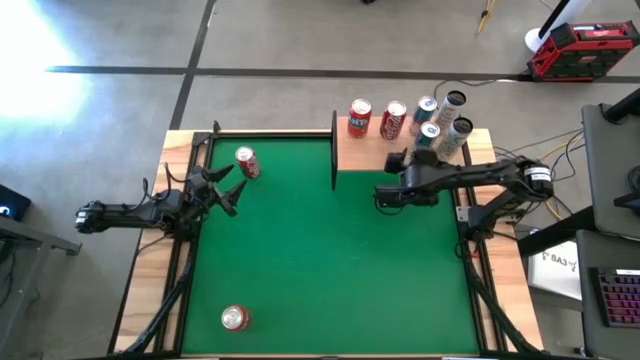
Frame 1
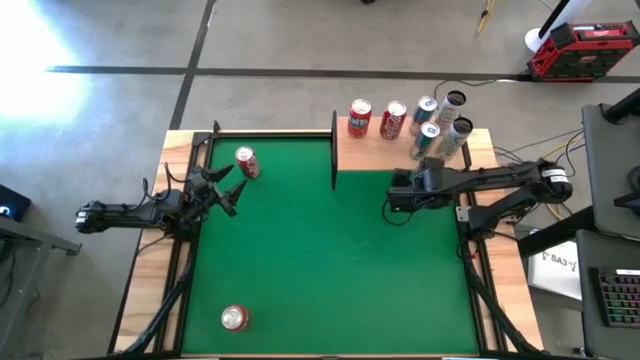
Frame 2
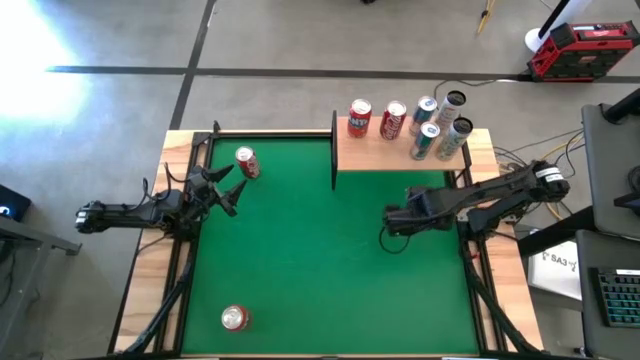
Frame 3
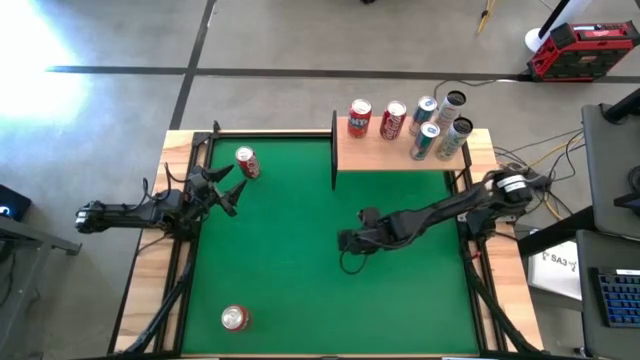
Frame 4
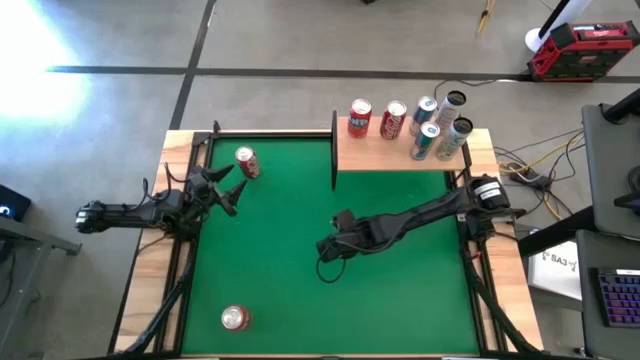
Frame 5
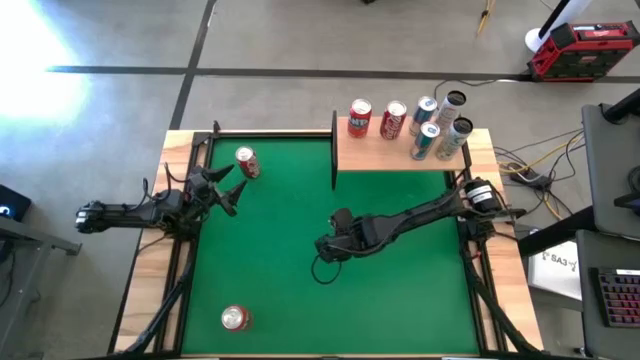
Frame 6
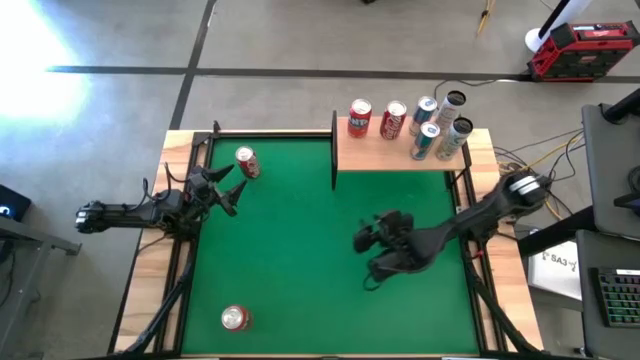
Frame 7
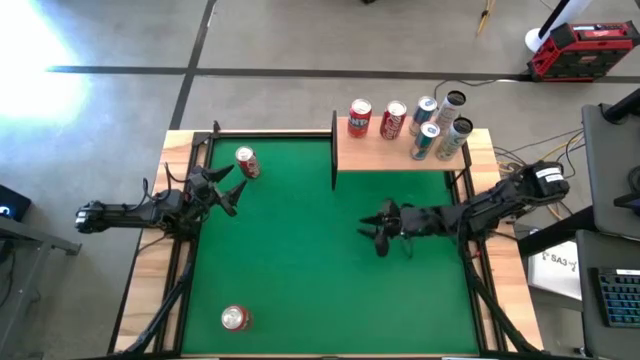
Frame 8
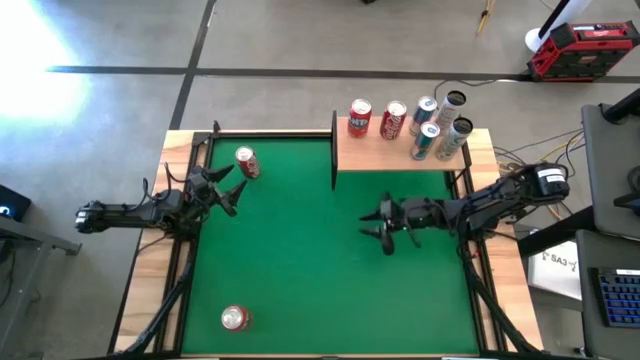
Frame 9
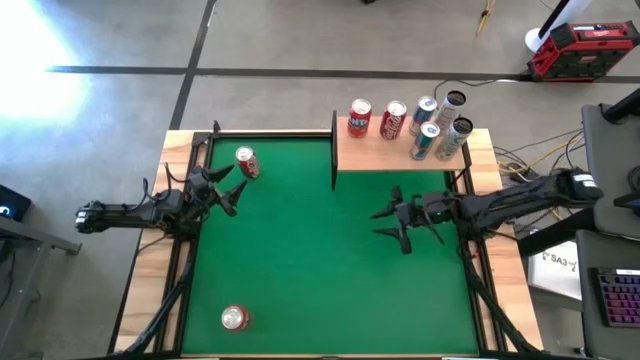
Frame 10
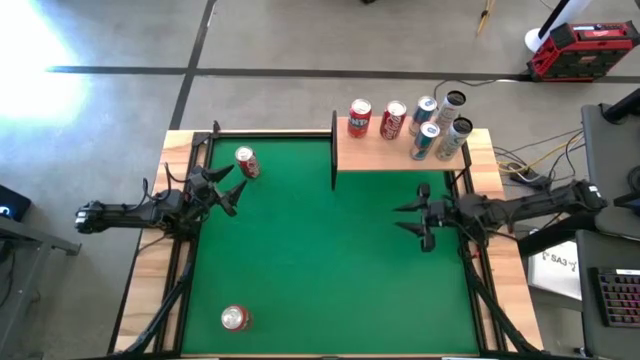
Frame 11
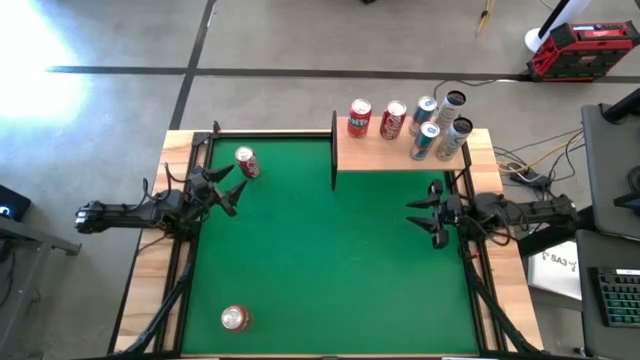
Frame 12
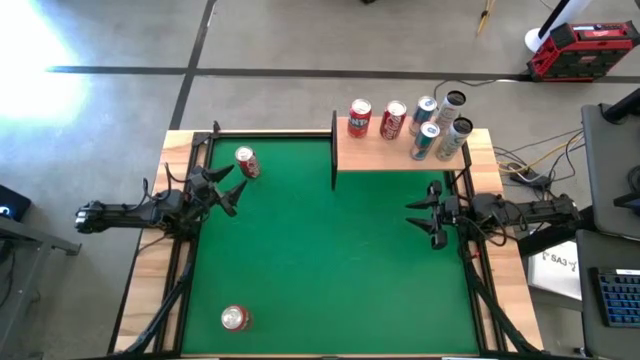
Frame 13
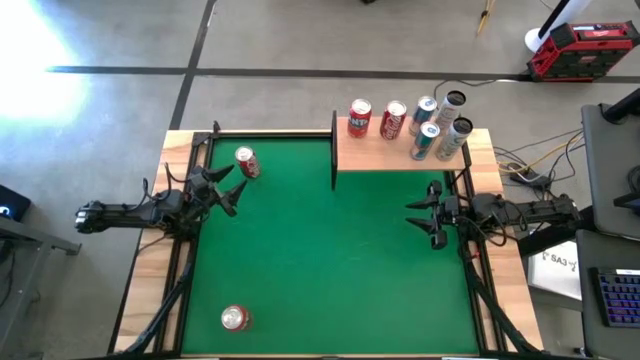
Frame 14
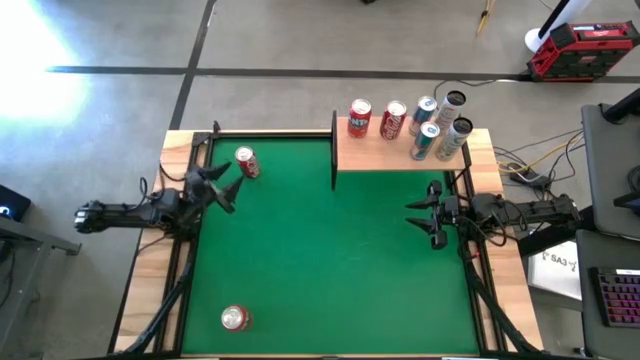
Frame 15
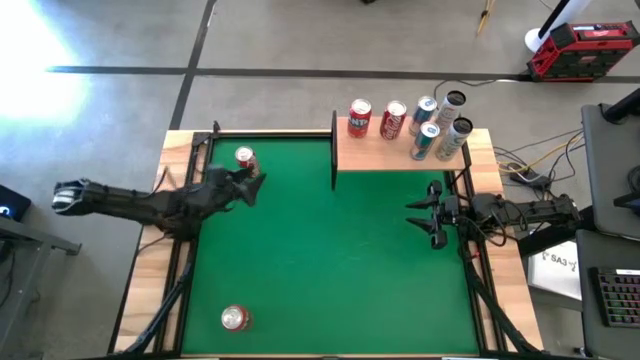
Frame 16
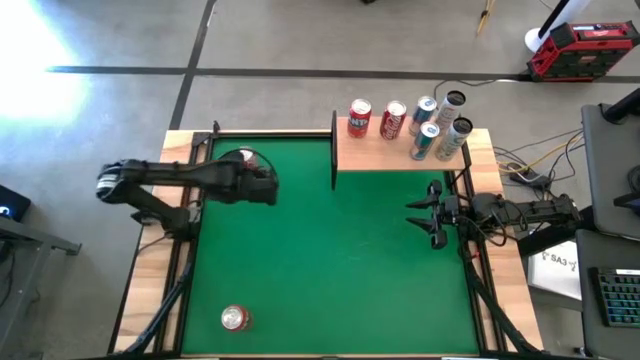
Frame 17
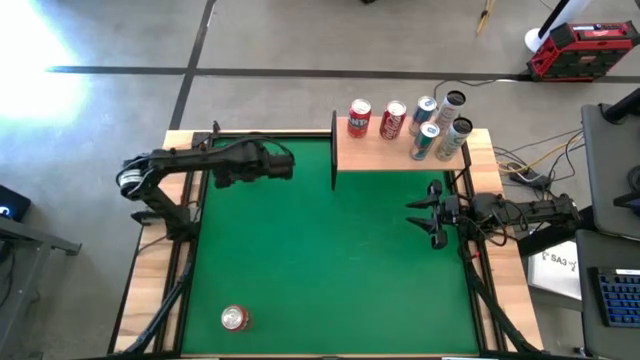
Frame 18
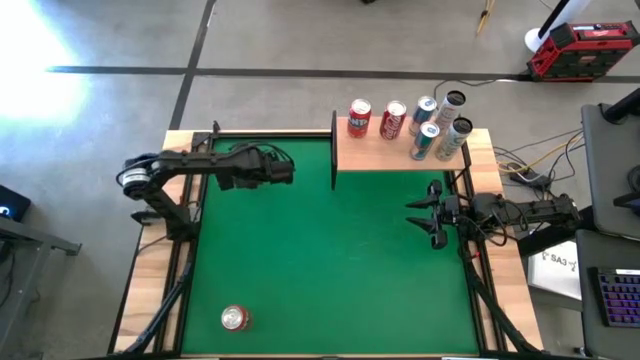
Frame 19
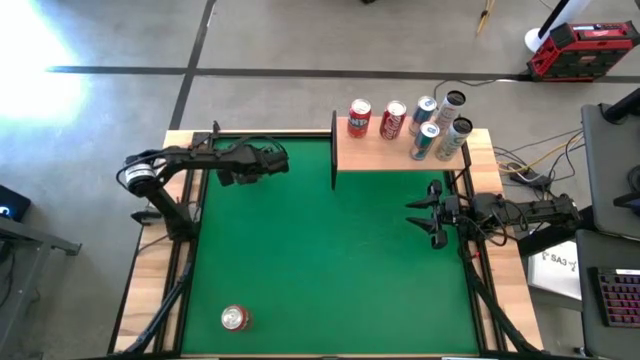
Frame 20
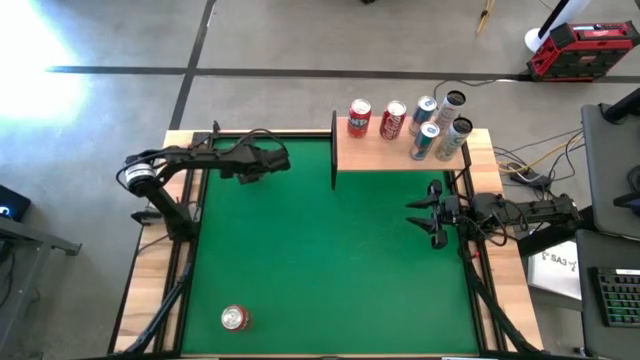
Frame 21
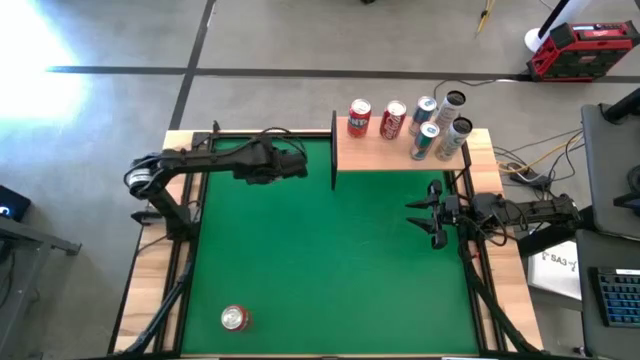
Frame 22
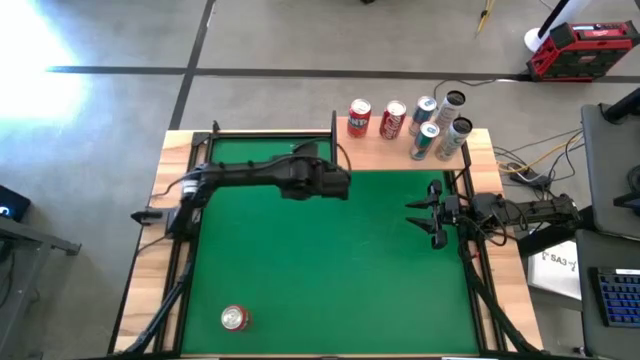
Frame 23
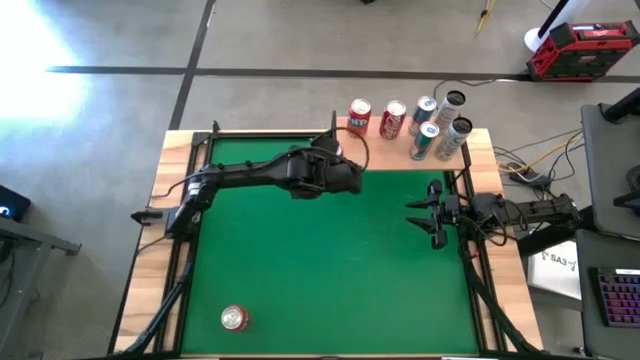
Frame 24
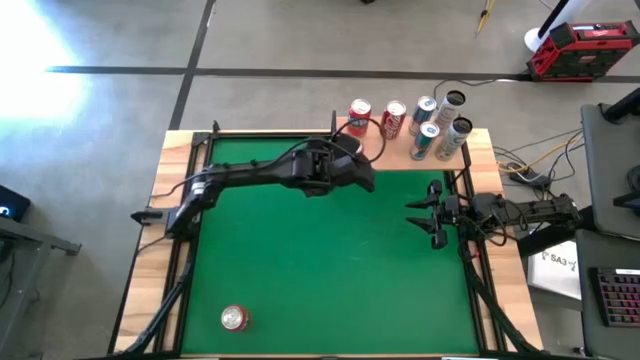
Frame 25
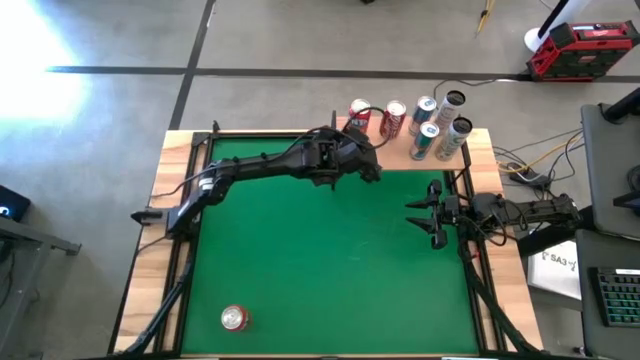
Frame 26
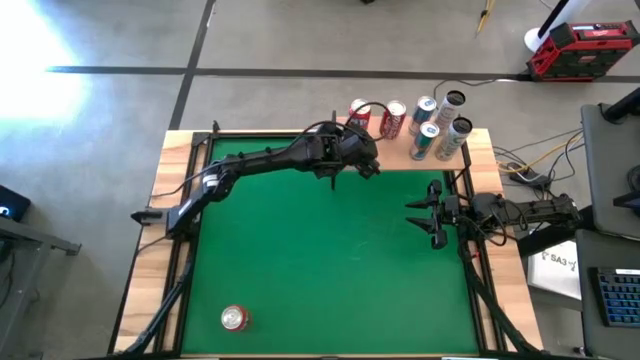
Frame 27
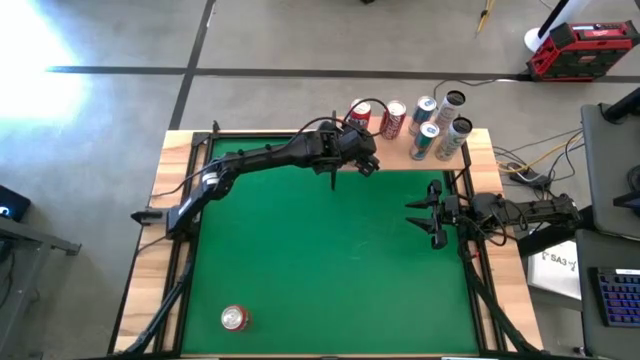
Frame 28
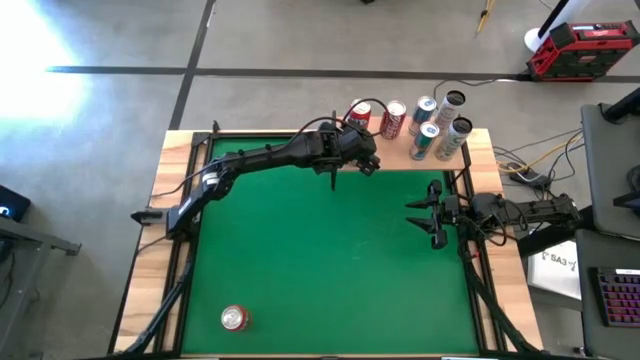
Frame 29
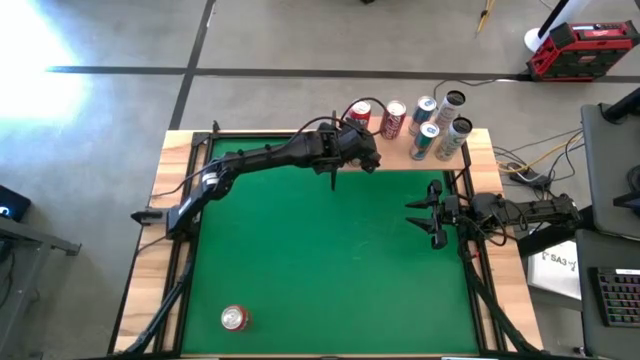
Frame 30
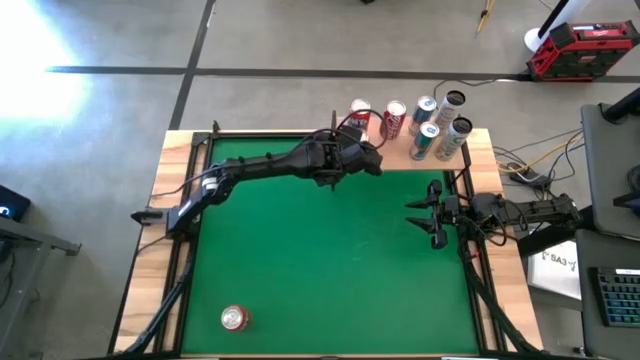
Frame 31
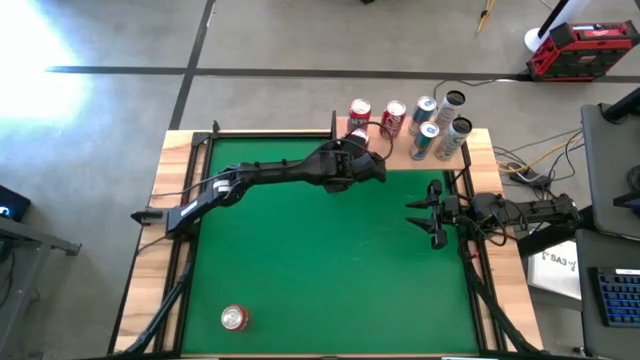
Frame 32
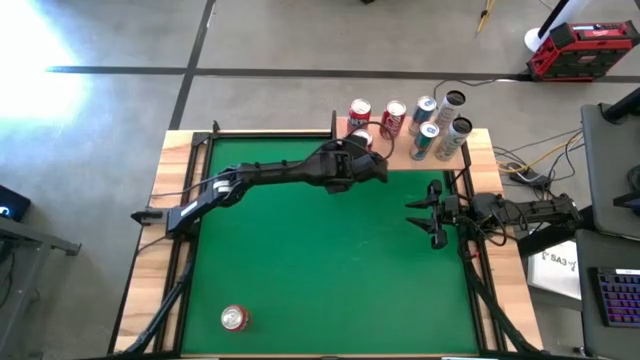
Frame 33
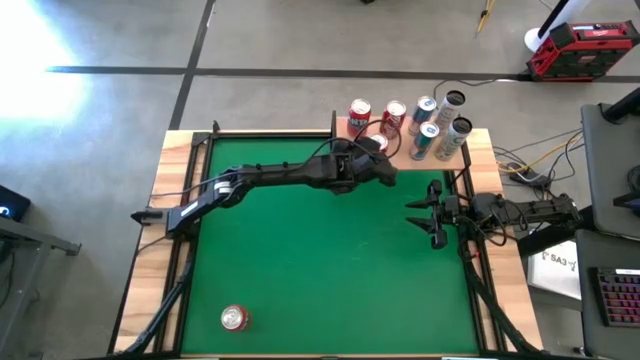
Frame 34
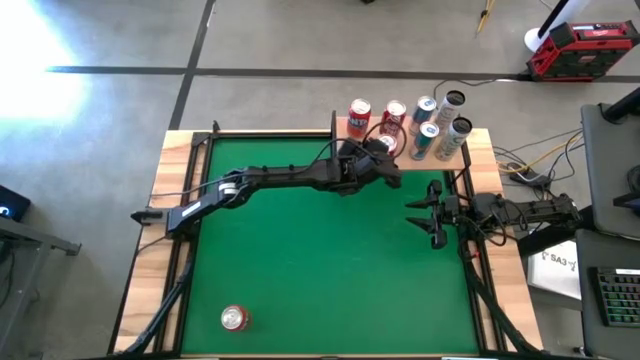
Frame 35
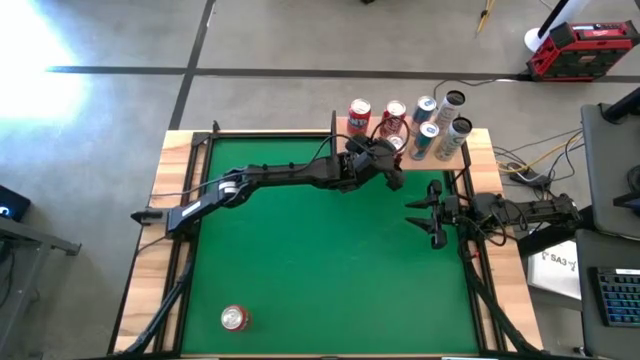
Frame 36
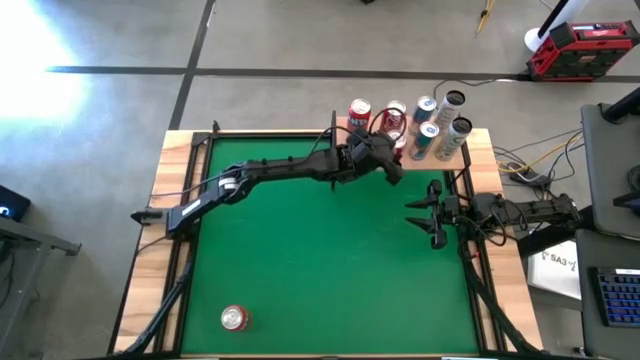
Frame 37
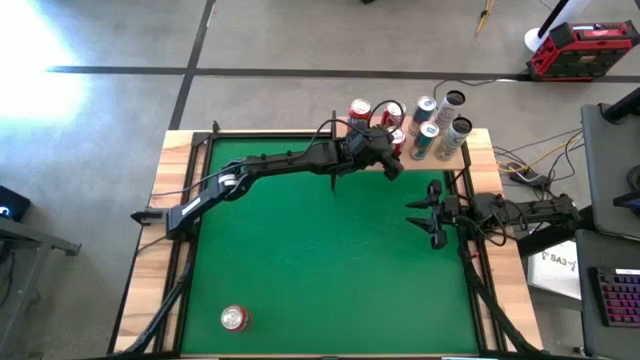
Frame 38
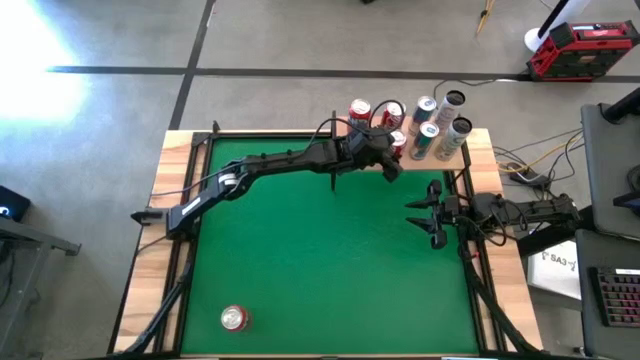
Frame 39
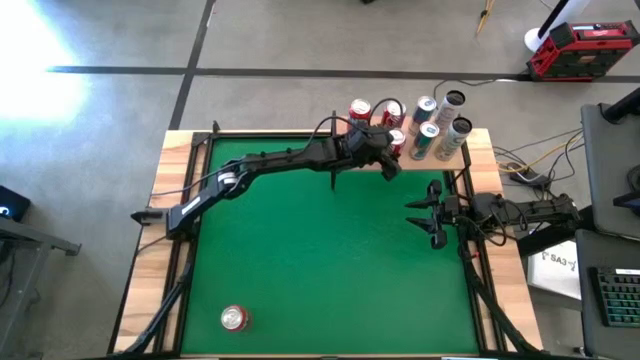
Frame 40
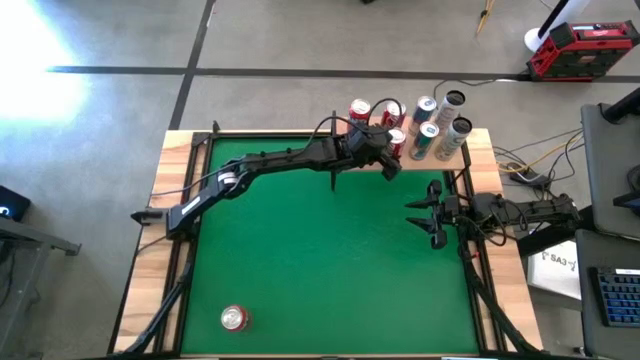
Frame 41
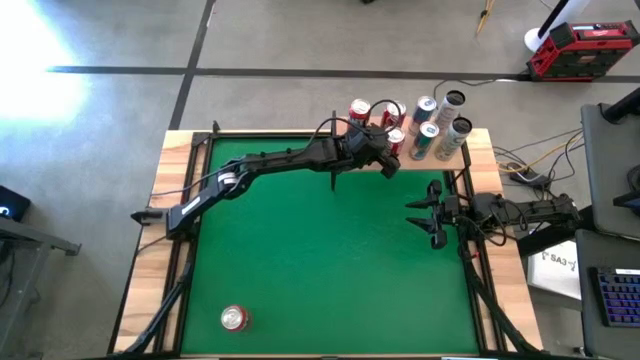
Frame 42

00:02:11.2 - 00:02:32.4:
Task: Place canned beverage on shelf
Put the red white soda can on the shelf aligned with the other red white soda can

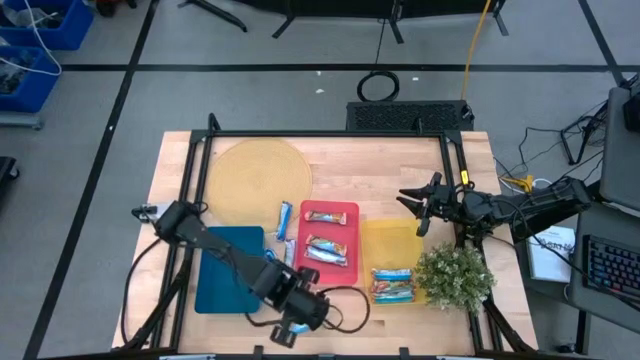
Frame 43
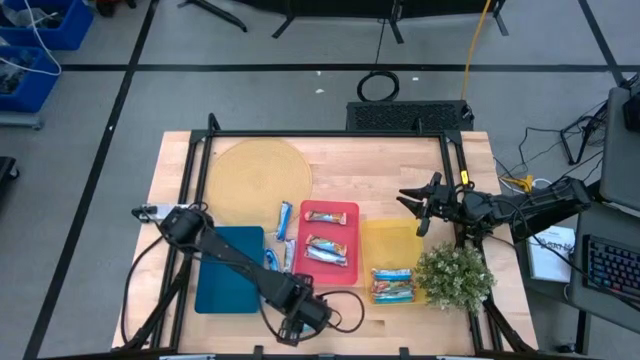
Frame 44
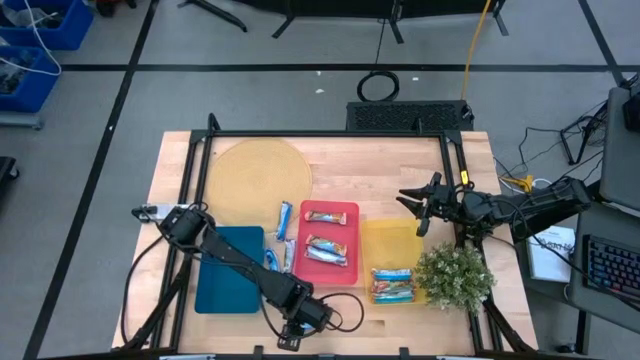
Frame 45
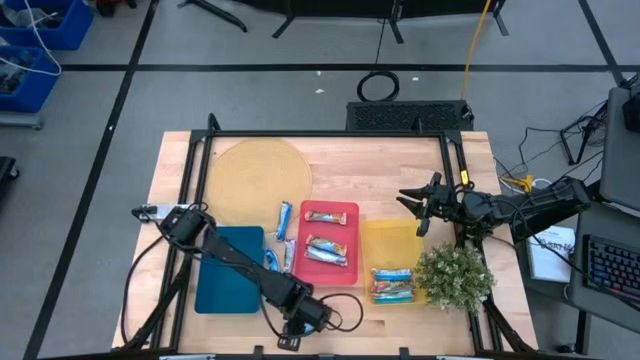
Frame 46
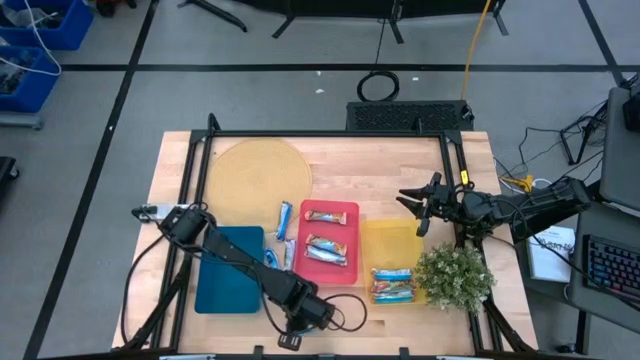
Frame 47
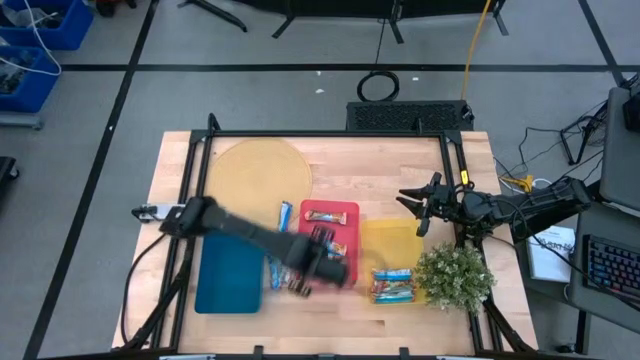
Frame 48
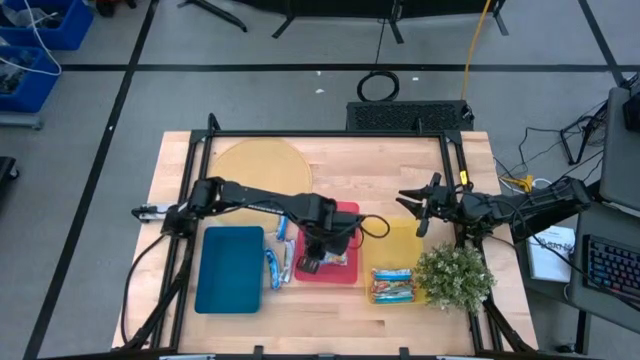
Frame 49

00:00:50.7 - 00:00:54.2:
Task: Pick and place Granola Bars by type
Put the yellow granola bar into the red bin
